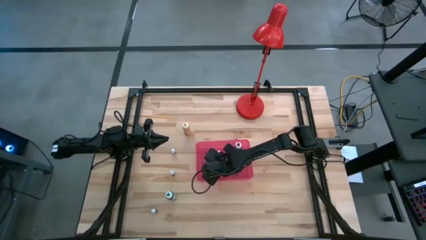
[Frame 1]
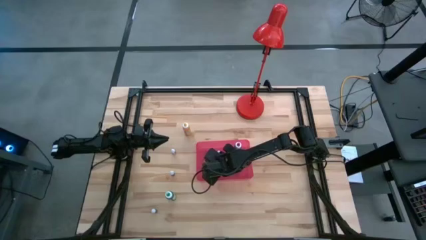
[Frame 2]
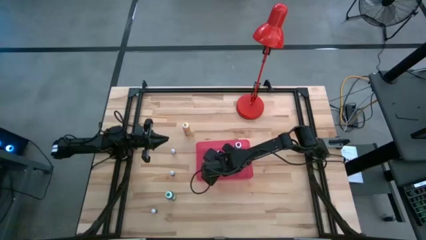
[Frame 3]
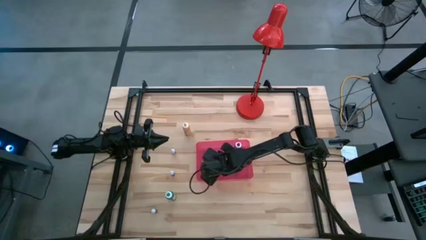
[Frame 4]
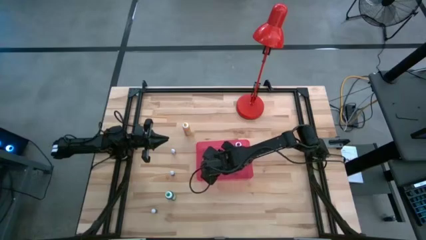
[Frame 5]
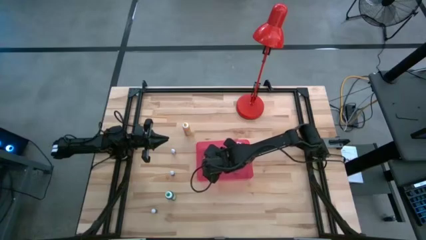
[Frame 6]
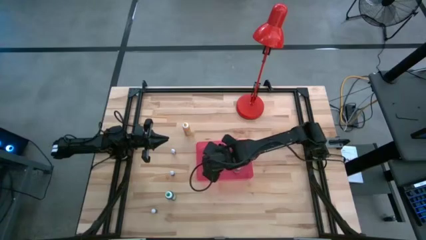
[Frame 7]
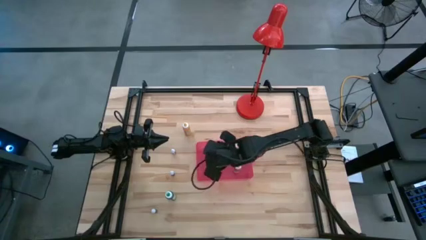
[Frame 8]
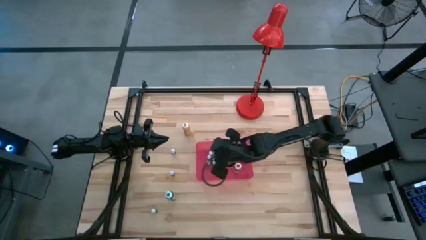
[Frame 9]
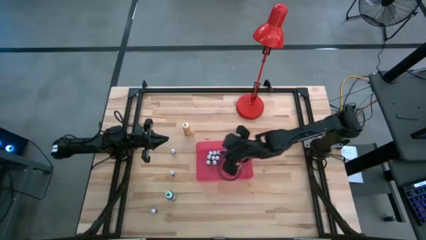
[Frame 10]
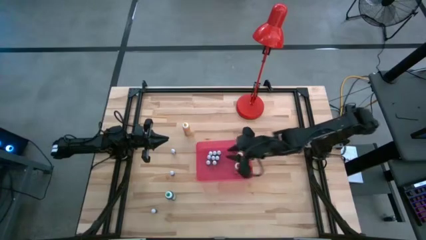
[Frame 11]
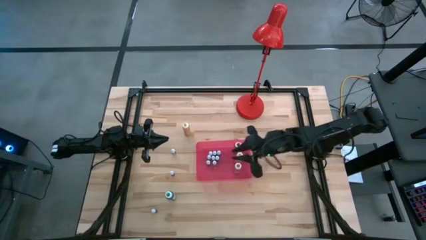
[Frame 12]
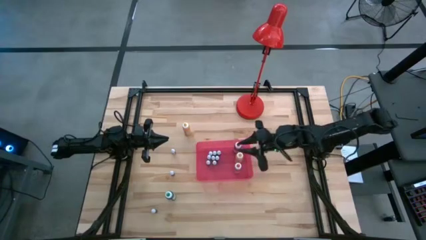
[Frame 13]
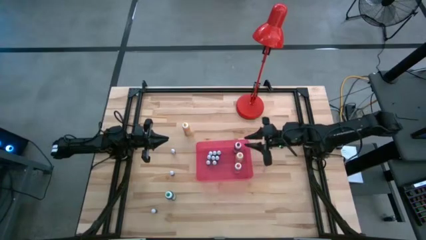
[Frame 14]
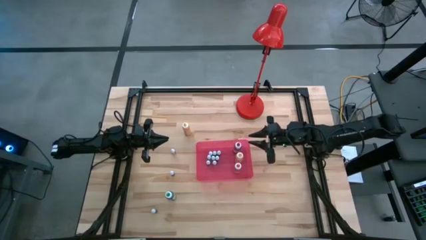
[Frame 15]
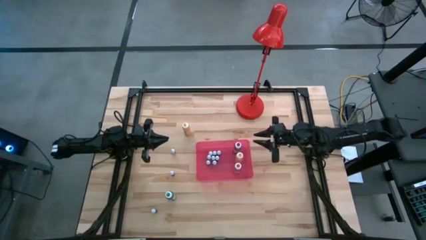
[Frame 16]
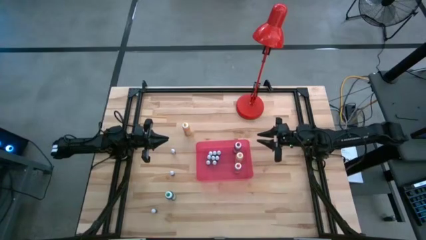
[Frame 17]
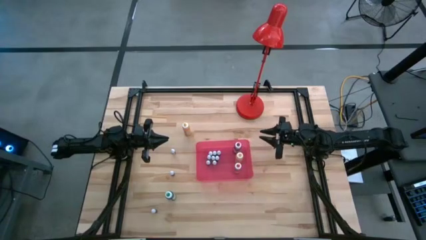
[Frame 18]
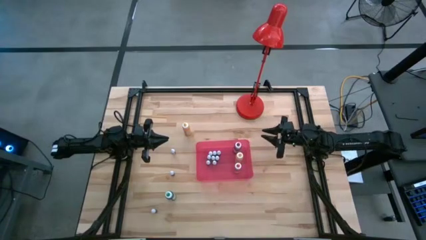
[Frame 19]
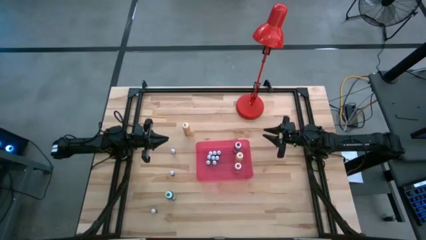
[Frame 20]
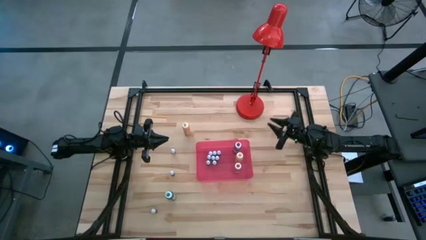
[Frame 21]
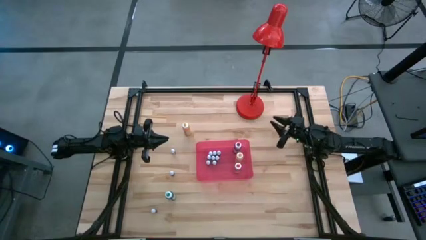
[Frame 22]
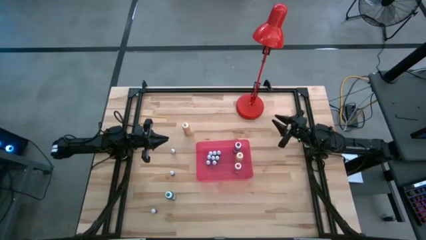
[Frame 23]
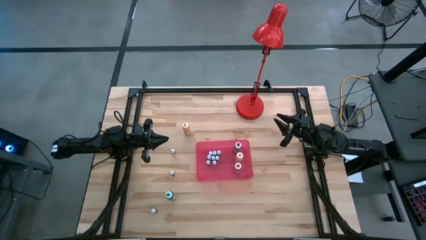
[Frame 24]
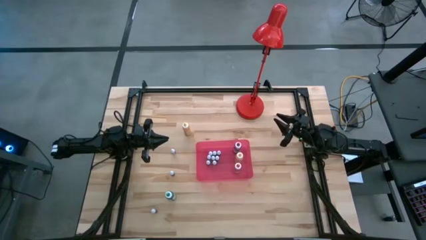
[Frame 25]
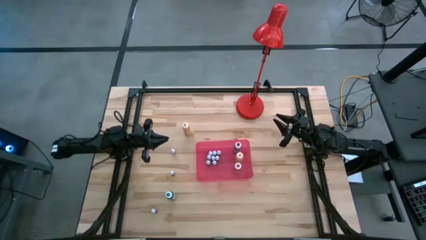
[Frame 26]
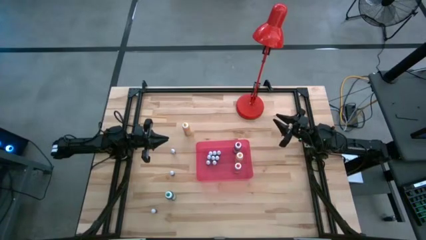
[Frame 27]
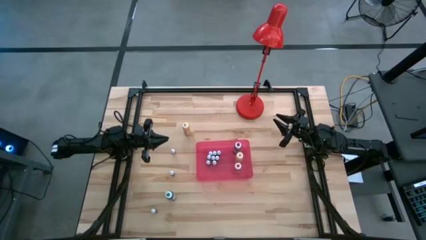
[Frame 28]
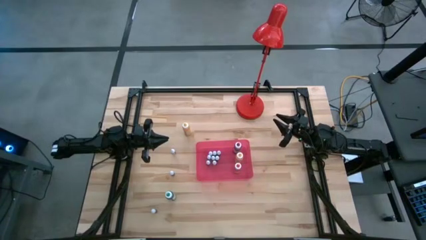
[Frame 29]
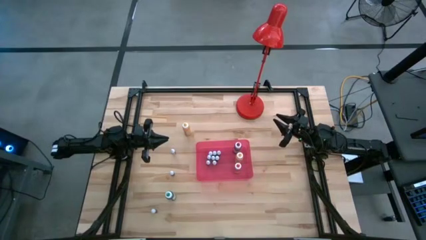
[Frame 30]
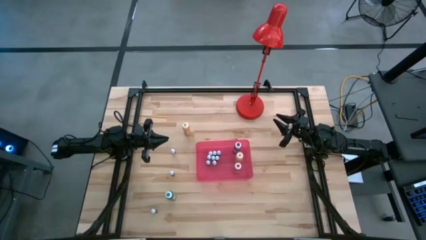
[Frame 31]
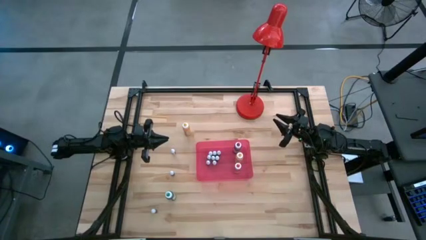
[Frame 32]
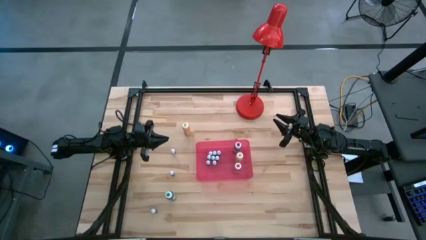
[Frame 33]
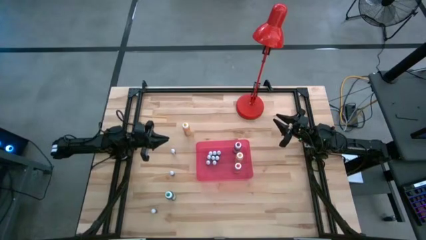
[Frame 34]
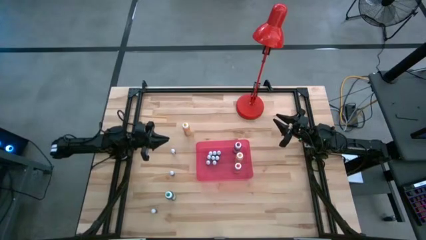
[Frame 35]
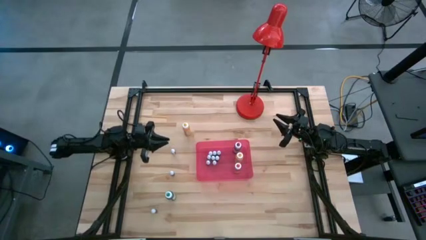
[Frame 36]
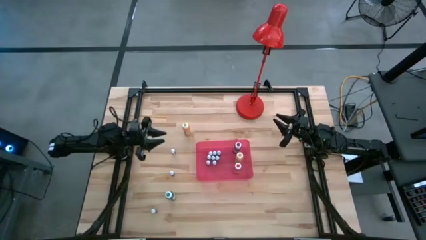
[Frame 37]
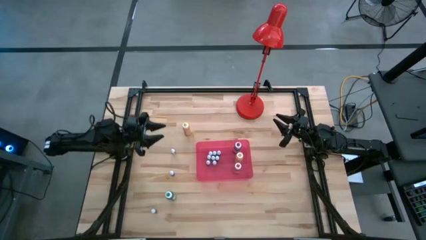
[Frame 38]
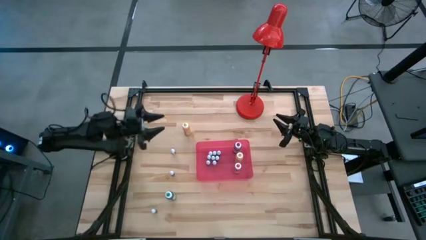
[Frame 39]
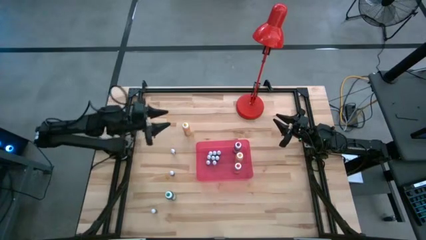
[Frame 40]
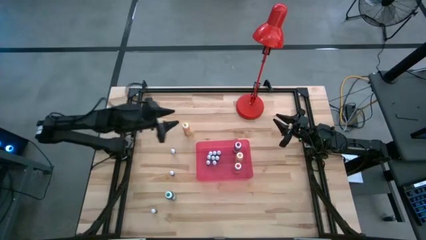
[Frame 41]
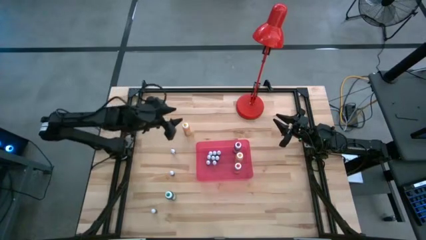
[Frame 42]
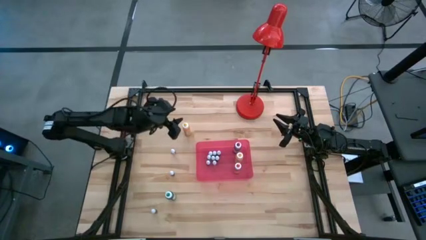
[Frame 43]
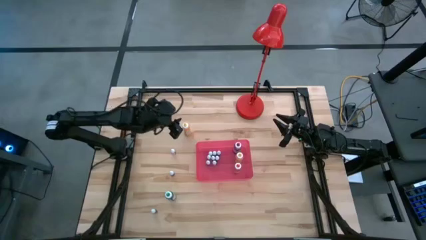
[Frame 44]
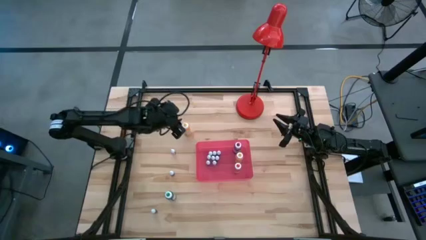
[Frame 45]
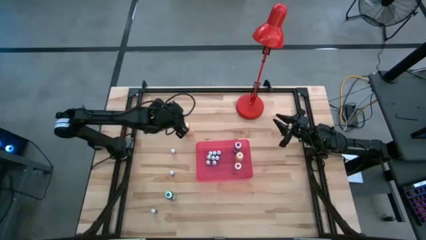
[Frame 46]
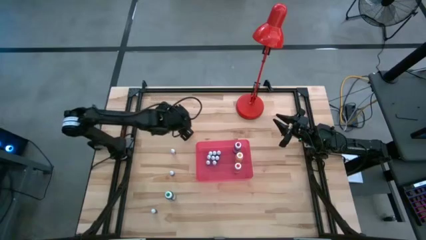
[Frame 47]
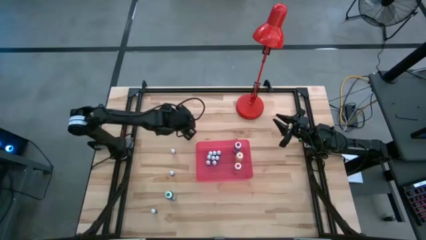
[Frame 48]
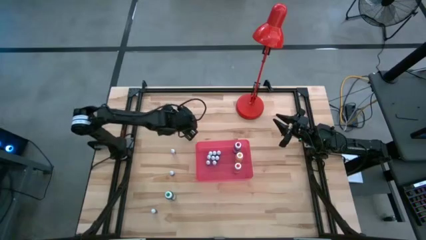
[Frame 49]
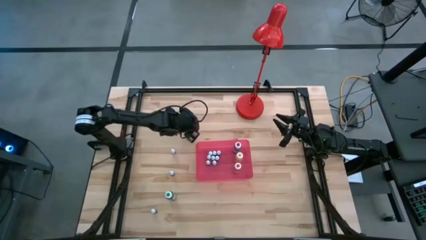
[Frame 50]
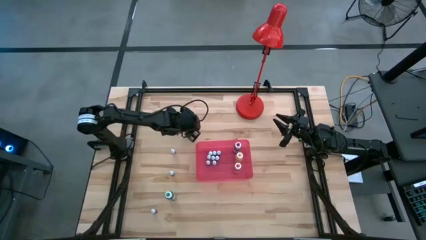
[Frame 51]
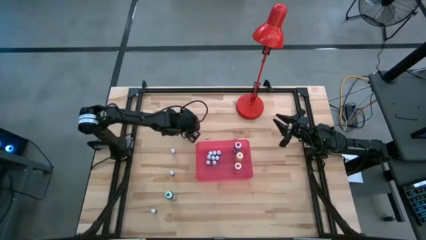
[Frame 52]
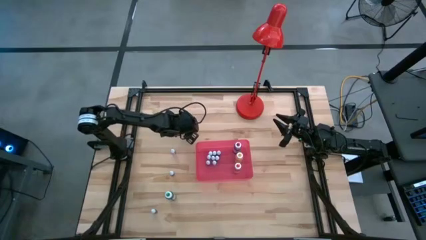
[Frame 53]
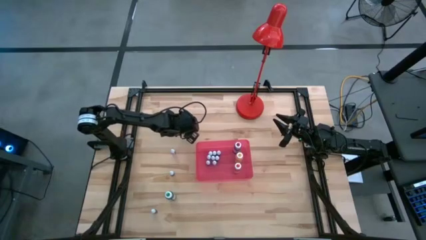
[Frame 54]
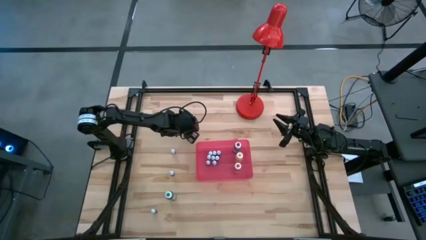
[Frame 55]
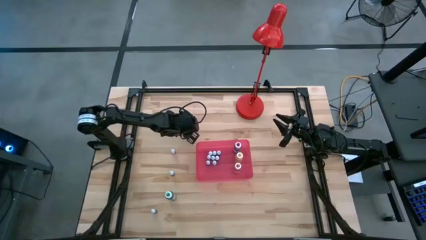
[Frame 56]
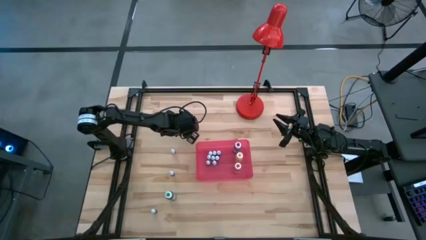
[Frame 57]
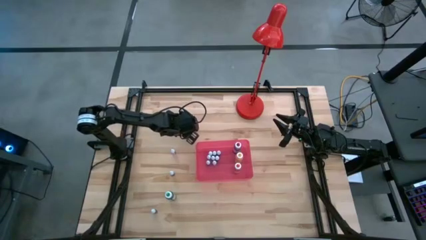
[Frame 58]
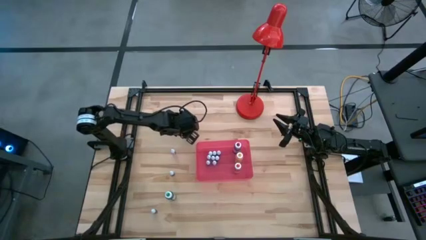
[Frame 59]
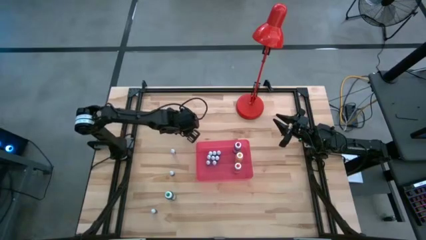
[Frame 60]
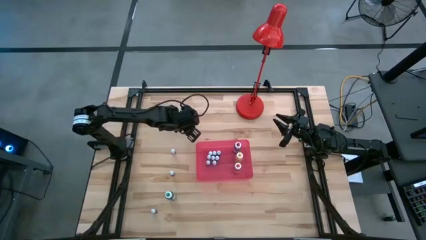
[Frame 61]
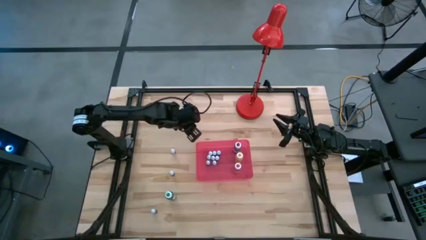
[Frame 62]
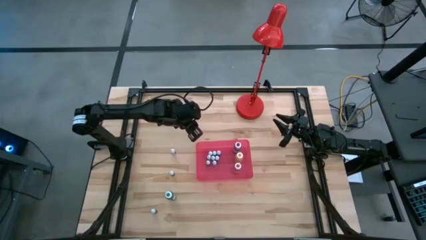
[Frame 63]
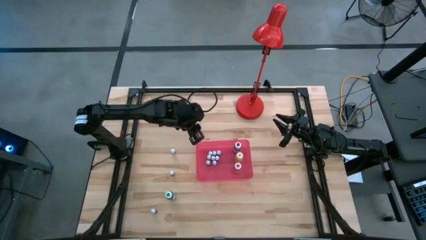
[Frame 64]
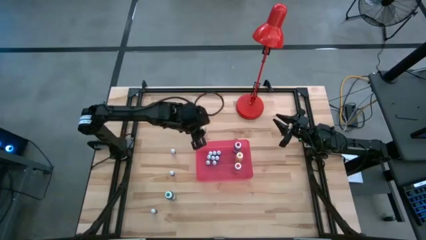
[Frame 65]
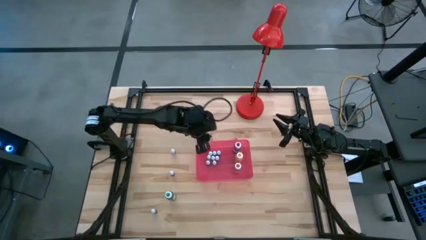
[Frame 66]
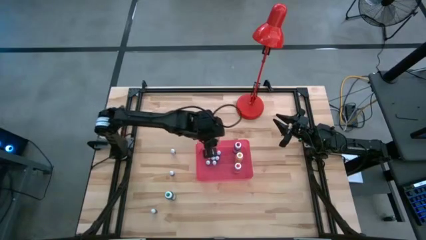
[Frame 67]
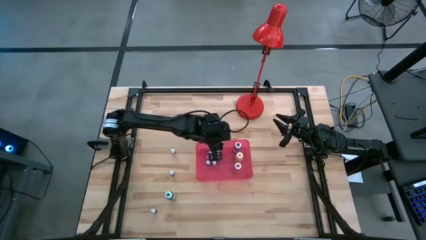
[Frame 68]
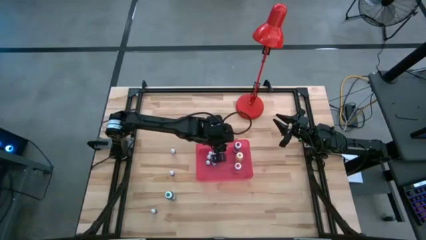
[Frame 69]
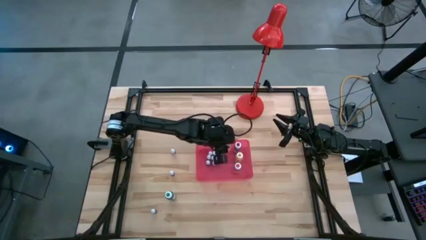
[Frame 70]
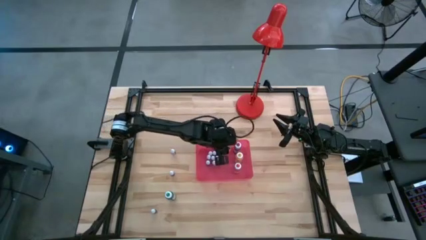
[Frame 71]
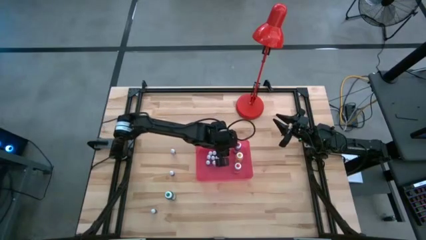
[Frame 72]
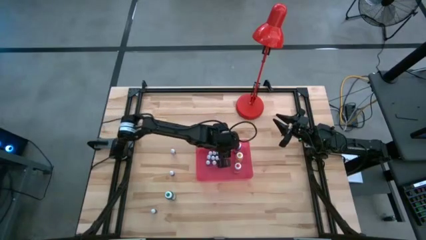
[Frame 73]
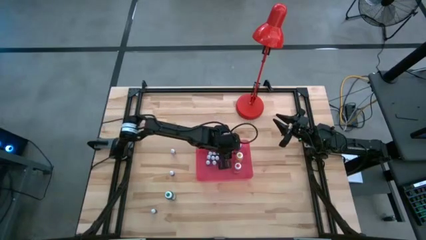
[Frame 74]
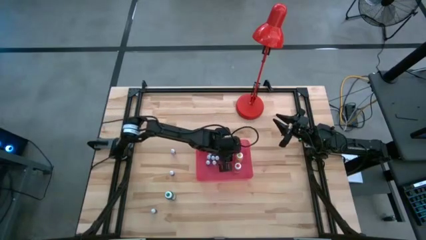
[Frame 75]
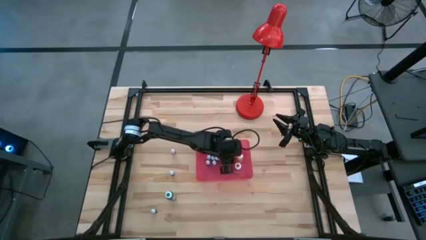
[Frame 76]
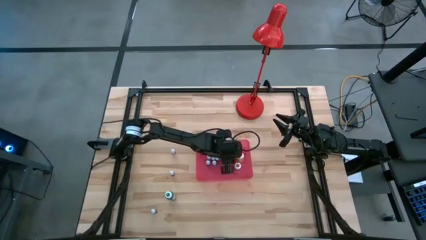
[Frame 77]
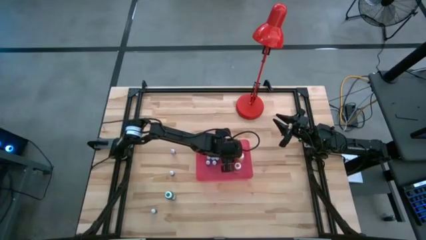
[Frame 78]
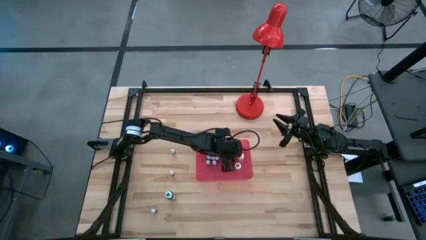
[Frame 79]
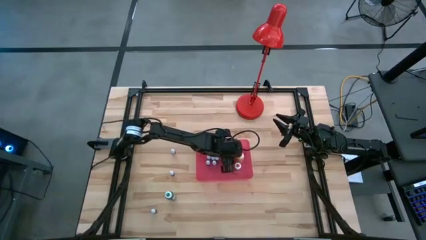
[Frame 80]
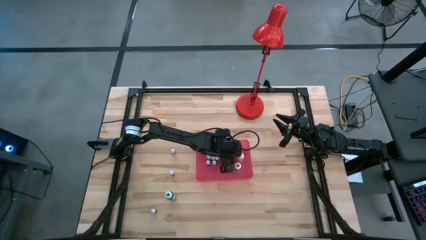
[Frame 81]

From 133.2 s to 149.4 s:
Task: Pick & Place food coloring
Put the large yellow food coloring bottle into the red bin
